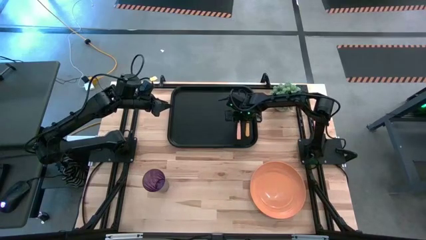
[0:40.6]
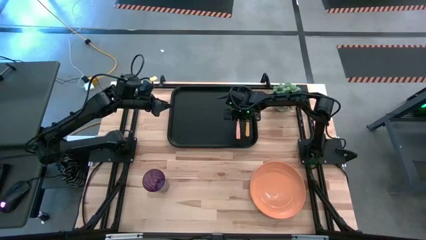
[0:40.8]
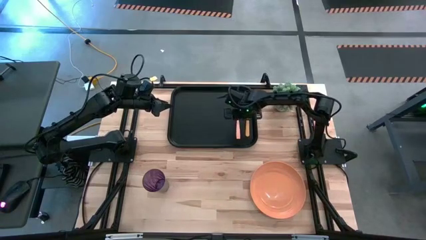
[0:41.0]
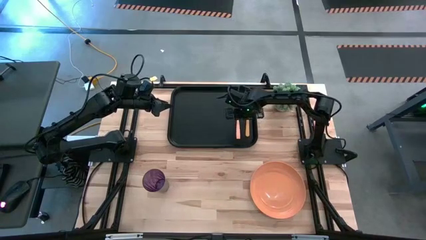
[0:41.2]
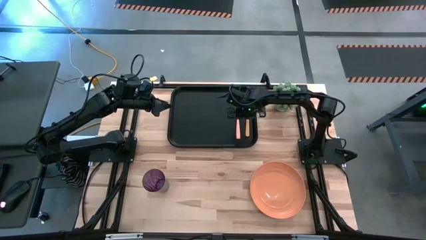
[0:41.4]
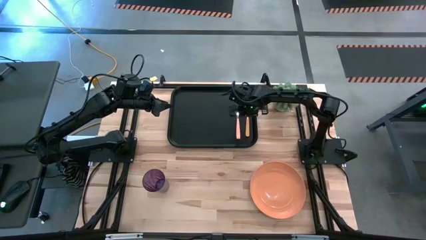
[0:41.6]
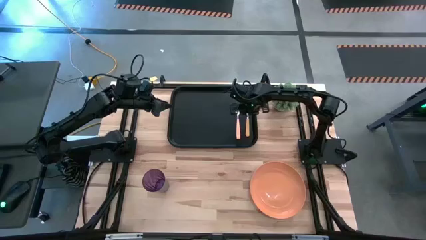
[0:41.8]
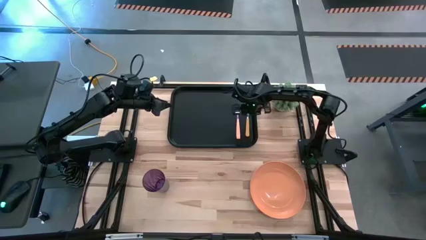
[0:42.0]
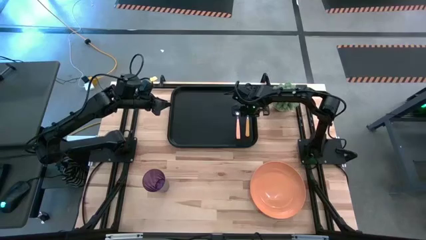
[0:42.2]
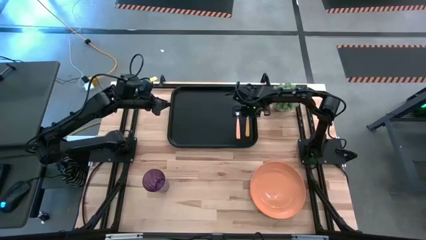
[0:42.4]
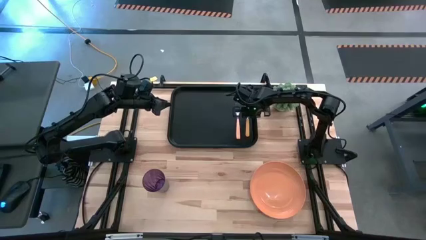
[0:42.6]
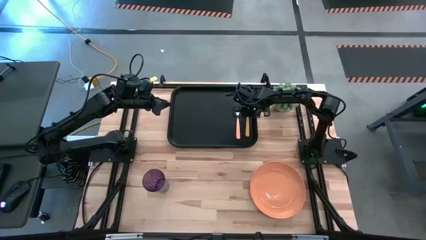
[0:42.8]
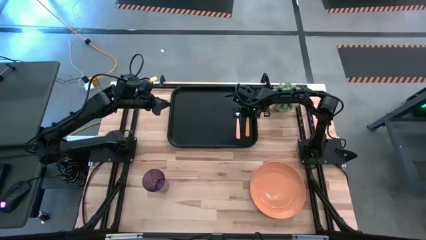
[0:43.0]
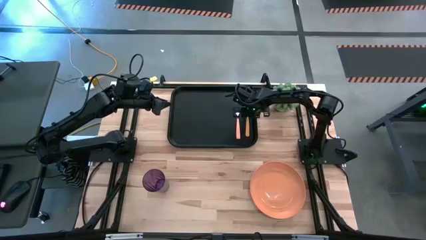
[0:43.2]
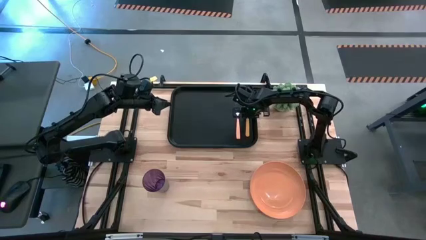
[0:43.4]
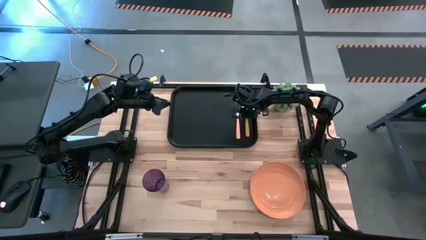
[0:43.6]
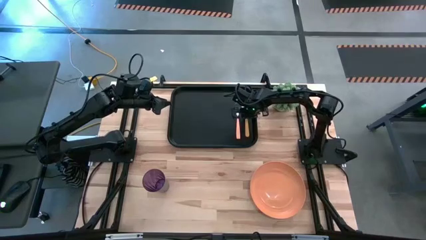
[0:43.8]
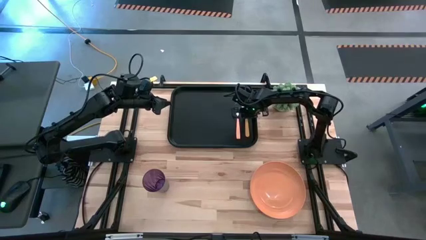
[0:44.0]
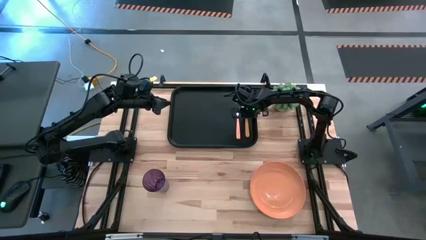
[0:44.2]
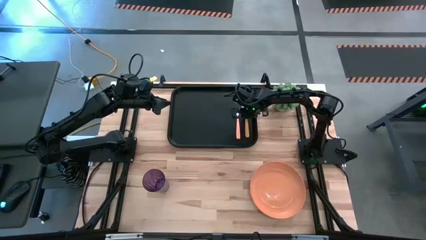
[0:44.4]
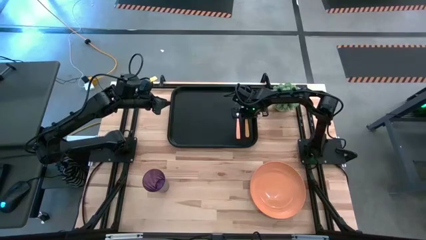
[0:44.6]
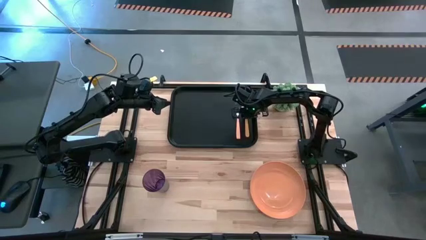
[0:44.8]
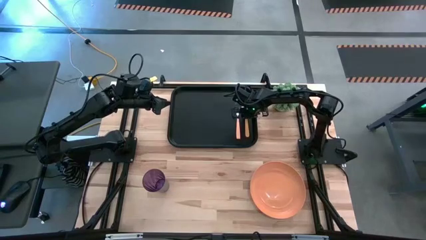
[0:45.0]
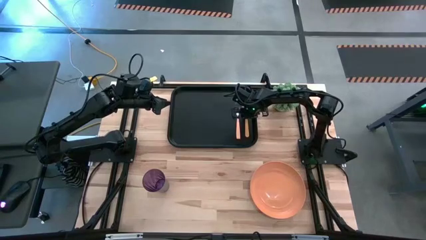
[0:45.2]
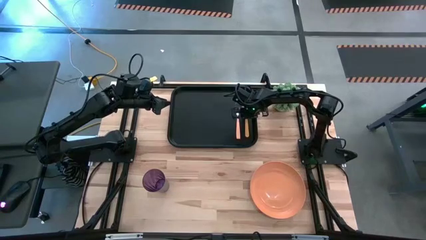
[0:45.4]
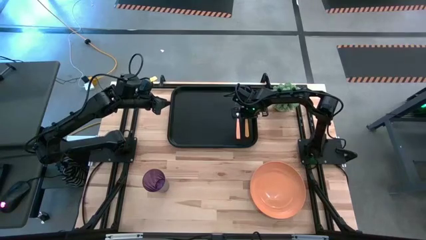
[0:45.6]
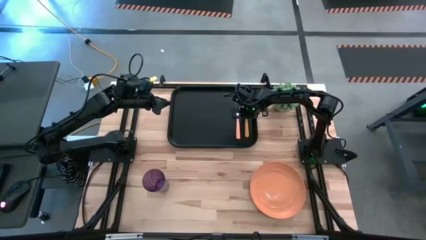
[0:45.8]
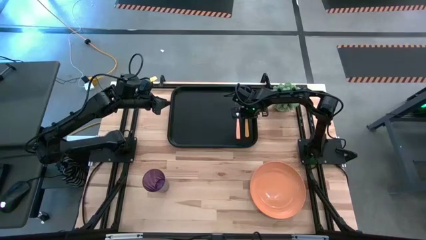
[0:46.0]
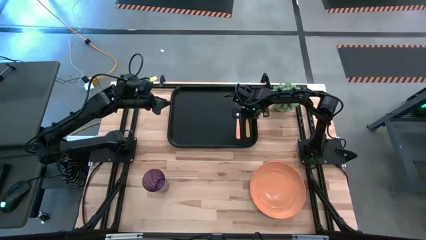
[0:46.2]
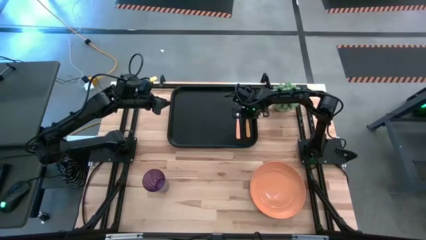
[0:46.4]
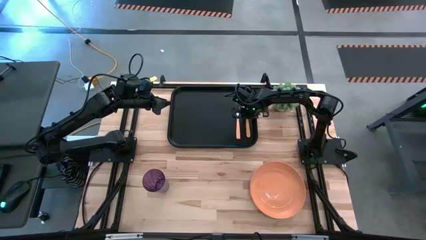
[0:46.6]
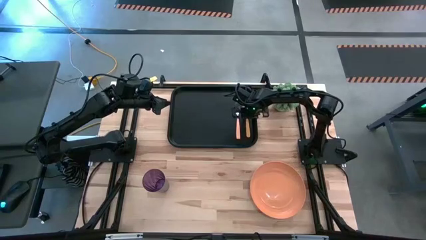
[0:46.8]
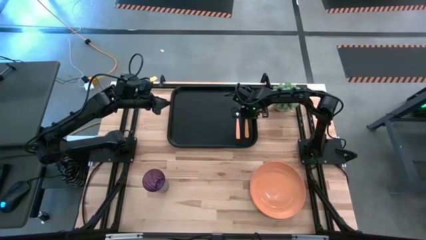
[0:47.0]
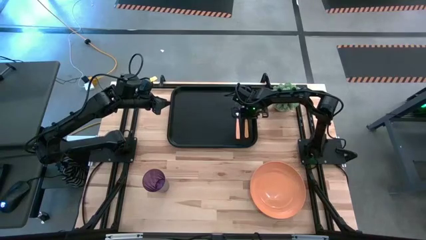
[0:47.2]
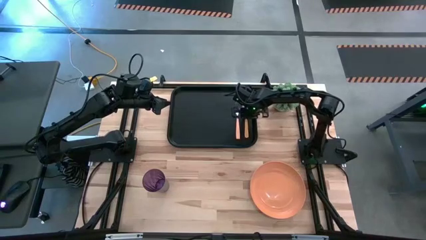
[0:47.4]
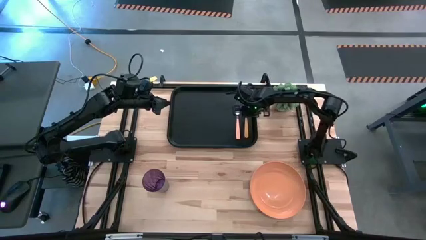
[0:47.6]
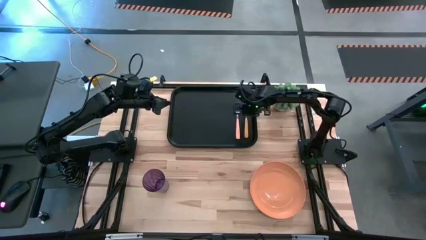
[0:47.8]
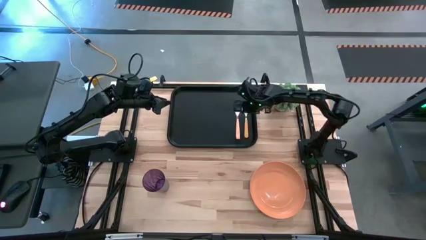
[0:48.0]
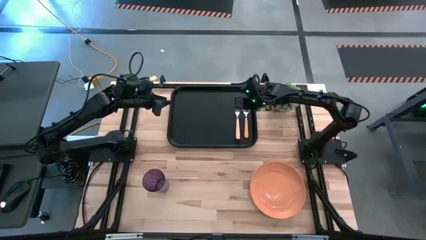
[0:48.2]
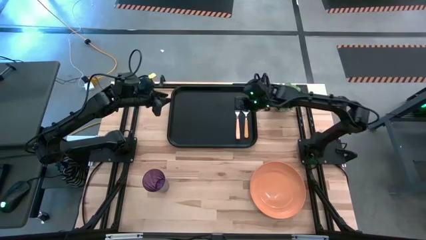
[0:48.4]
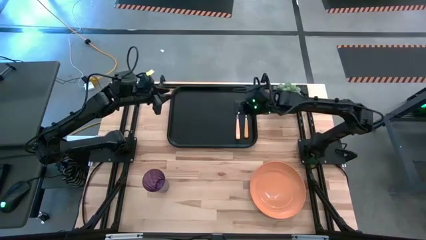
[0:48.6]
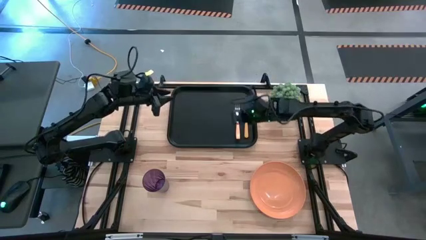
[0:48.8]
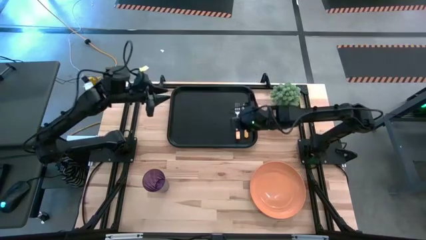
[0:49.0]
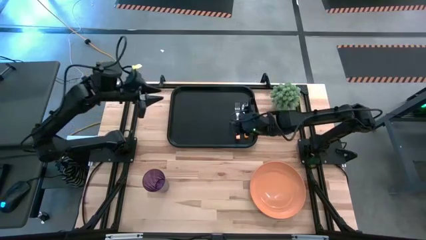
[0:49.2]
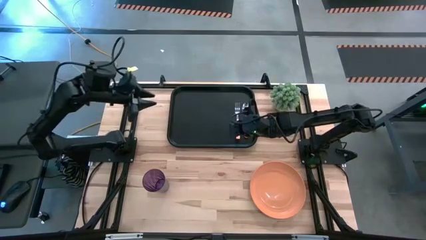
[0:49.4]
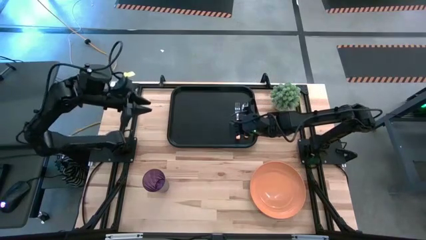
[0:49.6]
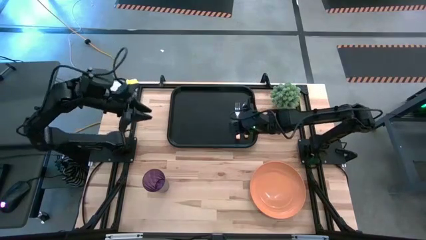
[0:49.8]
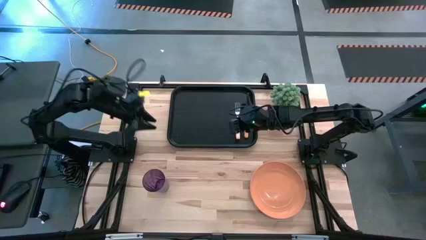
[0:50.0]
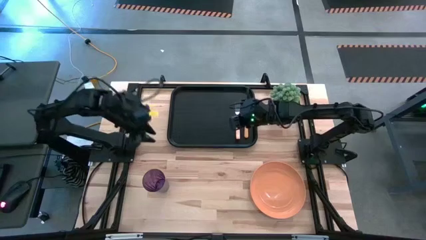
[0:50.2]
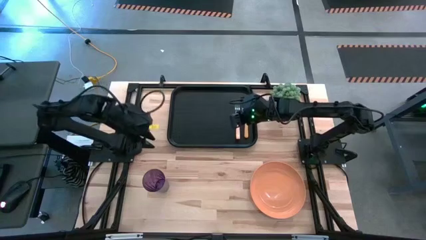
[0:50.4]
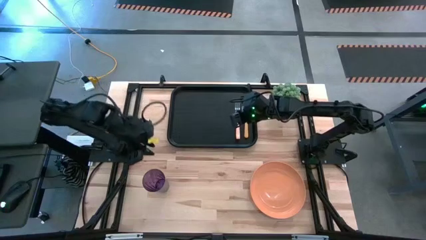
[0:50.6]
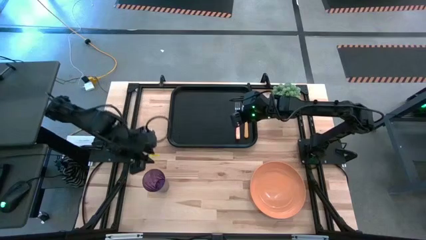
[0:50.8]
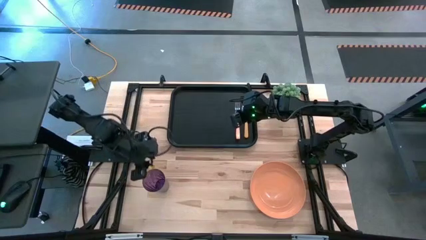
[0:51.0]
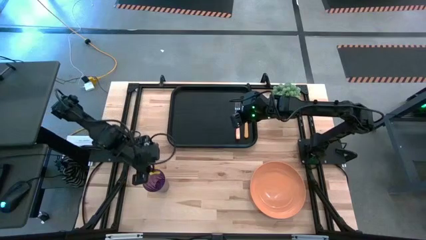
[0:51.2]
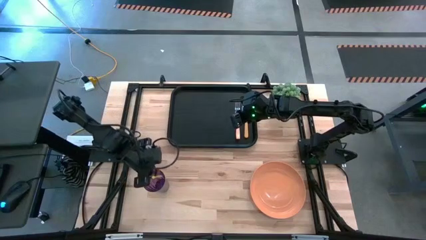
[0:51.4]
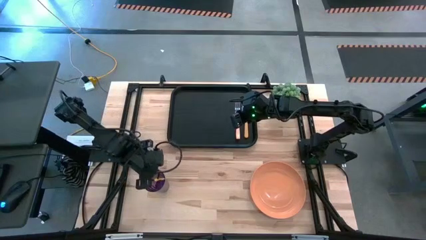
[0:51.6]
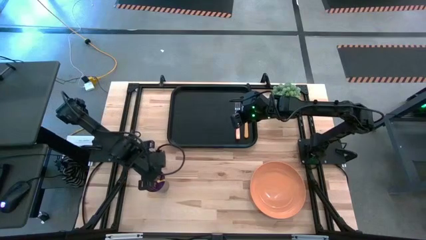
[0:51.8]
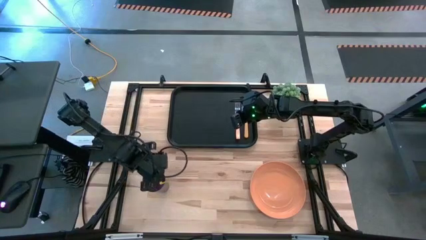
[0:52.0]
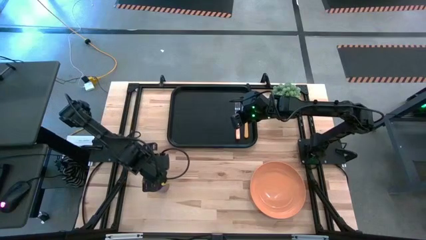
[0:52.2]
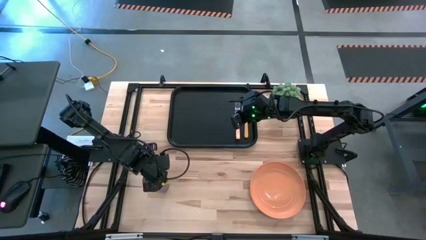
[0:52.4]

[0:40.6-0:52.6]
Task: Pick and place plate/cup/fork/spoon on tray
Adjust the orange spoon on the black tray

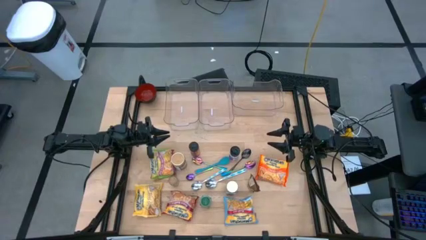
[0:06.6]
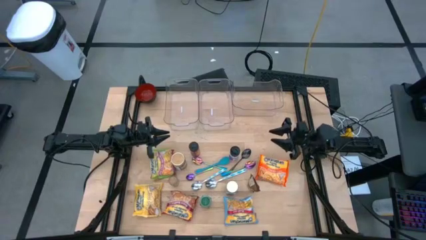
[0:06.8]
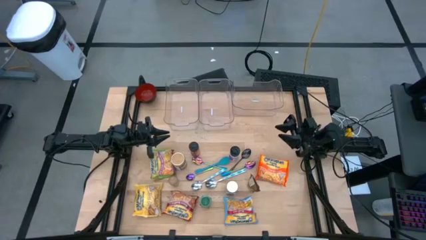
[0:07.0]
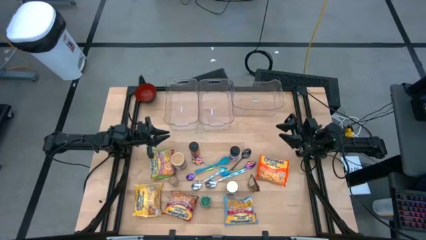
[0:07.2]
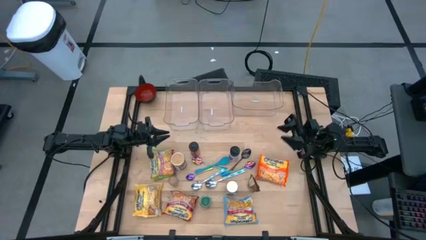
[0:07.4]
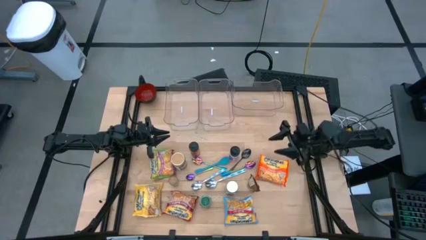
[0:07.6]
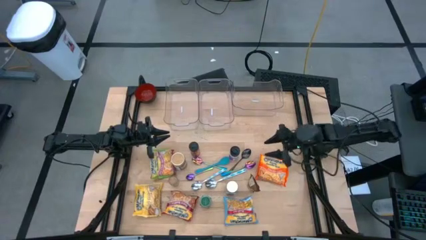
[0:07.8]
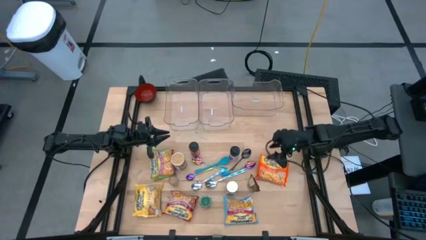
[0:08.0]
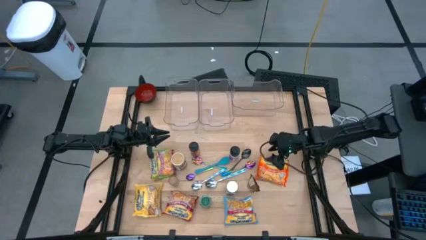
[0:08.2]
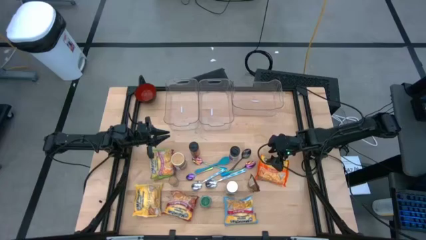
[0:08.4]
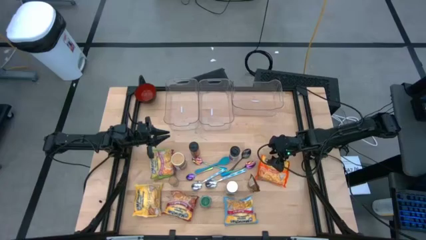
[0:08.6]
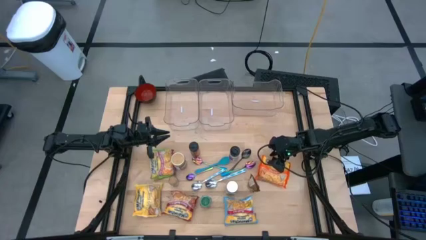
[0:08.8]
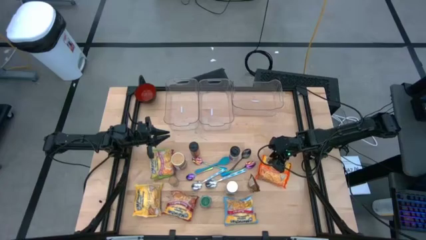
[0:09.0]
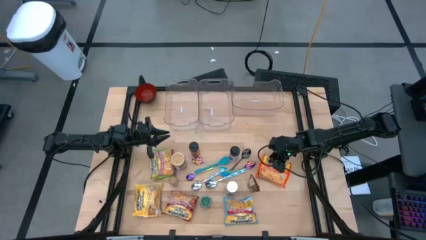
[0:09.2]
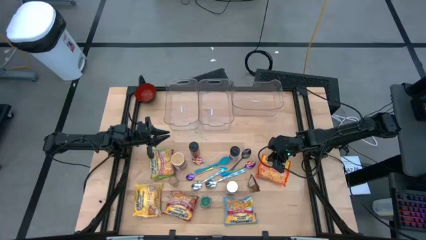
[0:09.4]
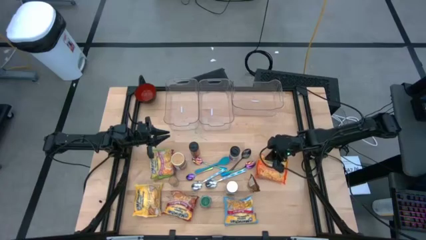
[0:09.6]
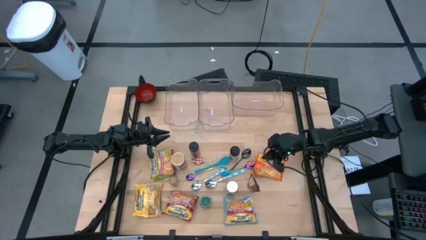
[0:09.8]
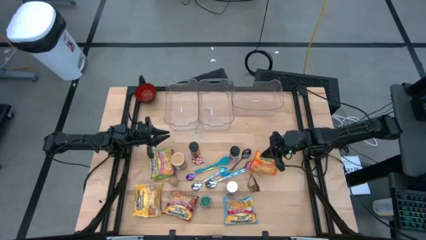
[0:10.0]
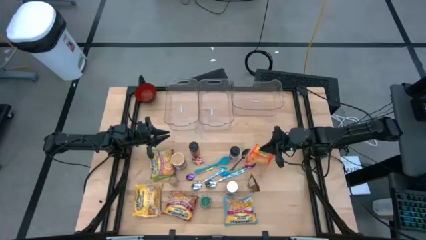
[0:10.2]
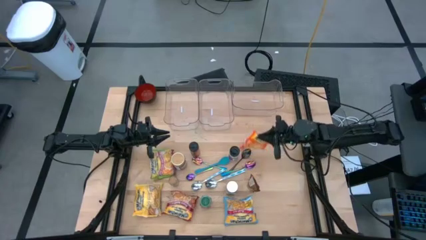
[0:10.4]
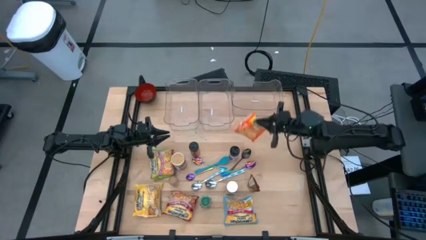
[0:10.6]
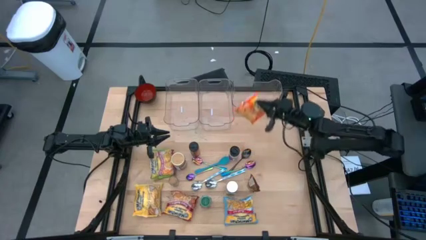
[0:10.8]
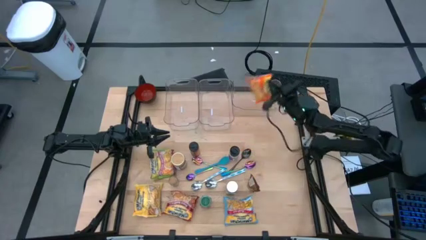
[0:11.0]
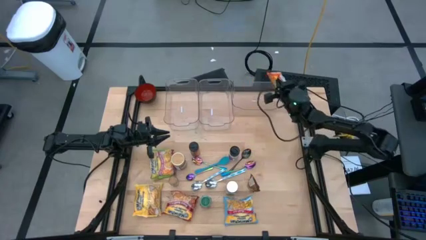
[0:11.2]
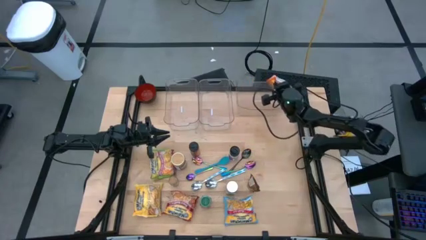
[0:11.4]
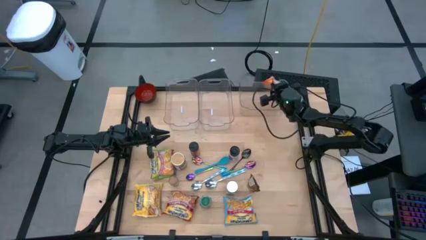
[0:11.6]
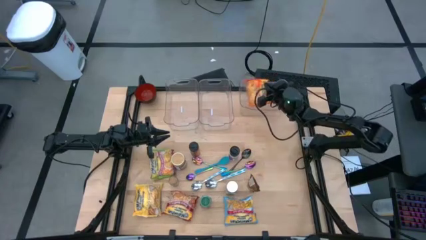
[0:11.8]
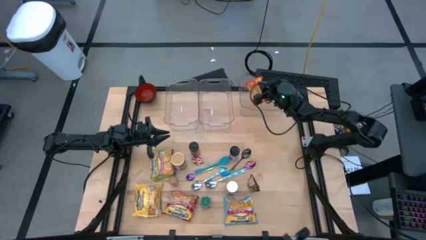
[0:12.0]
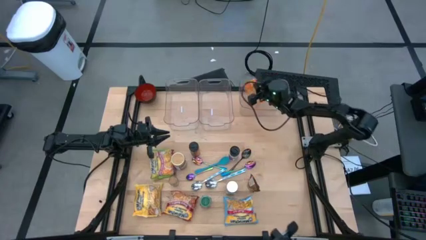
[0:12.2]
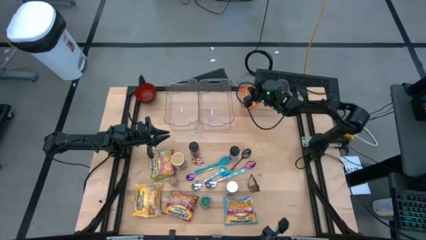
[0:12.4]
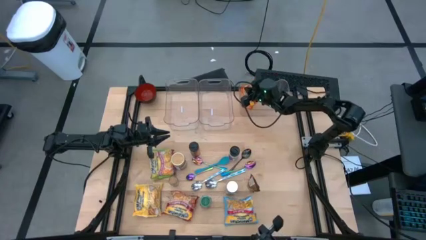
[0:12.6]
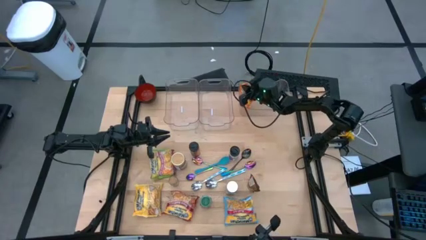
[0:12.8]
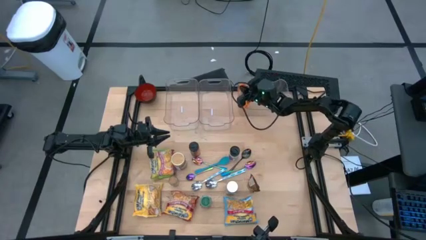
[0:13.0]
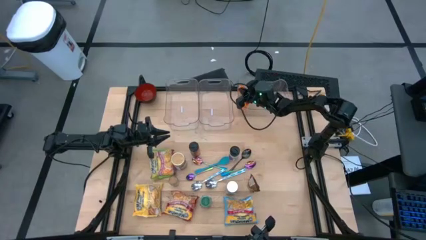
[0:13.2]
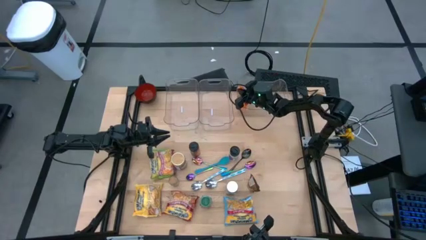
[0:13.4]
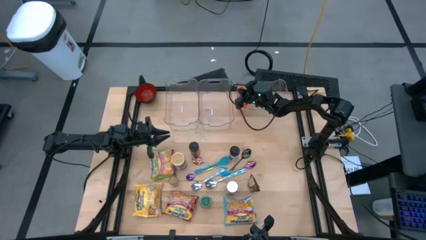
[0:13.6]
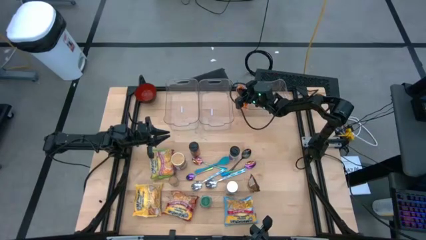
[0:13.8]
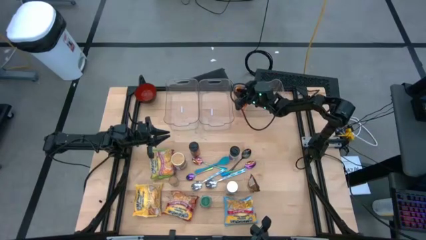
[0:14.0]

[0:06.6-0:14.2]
Task: Pick & Place Food Item
Put the orange noodle pack into the right transparent bin
